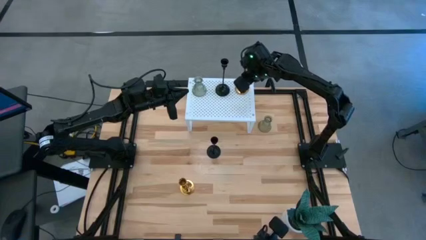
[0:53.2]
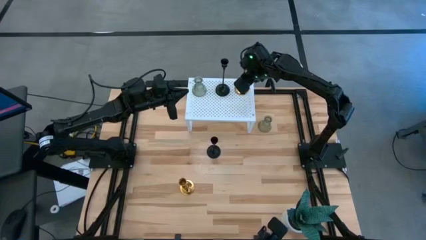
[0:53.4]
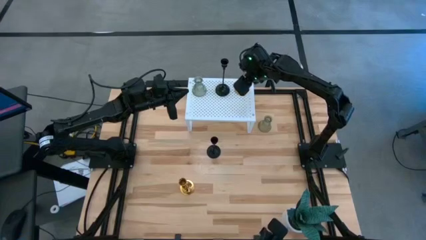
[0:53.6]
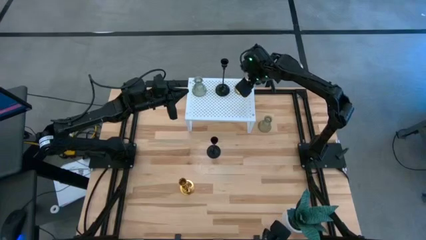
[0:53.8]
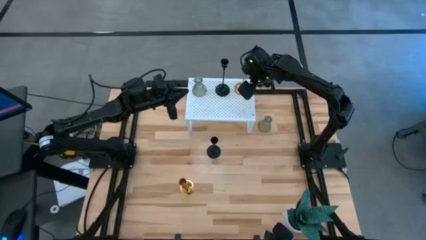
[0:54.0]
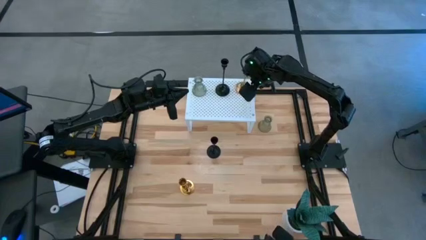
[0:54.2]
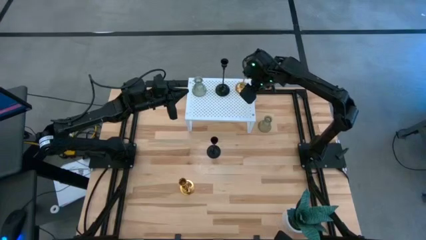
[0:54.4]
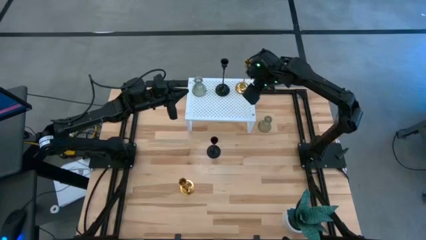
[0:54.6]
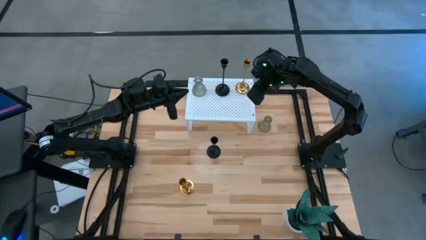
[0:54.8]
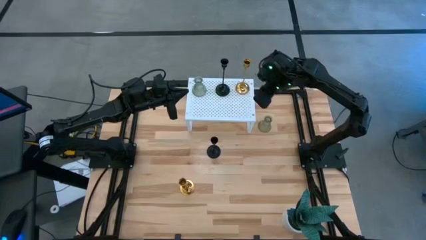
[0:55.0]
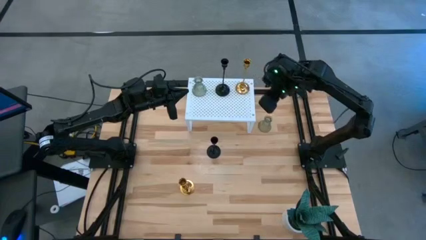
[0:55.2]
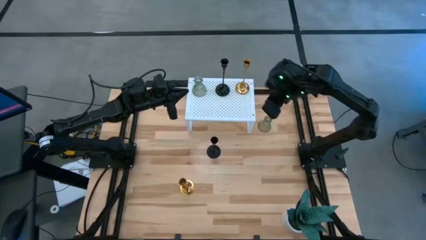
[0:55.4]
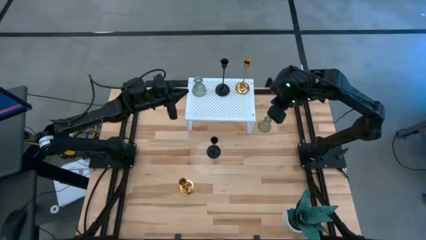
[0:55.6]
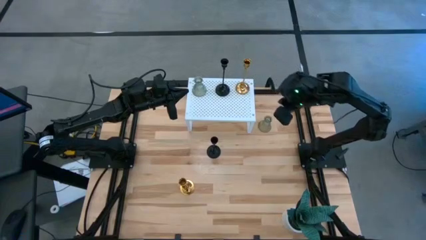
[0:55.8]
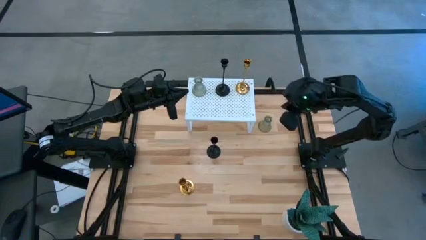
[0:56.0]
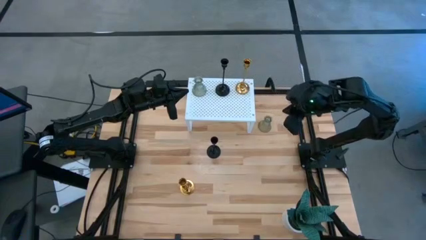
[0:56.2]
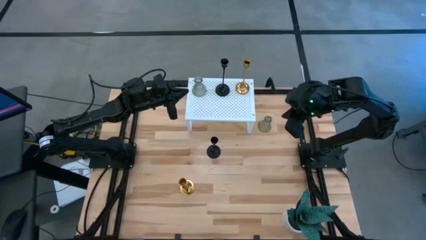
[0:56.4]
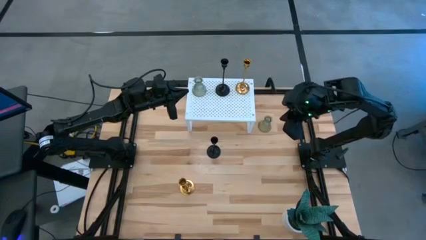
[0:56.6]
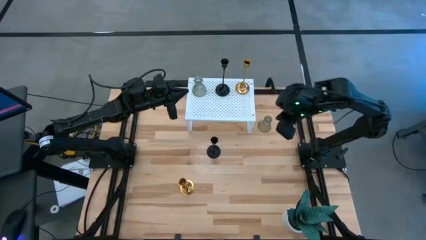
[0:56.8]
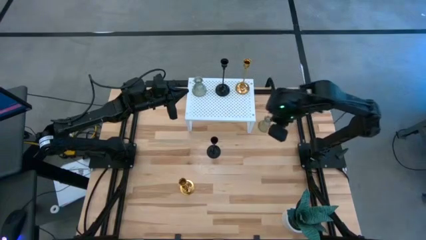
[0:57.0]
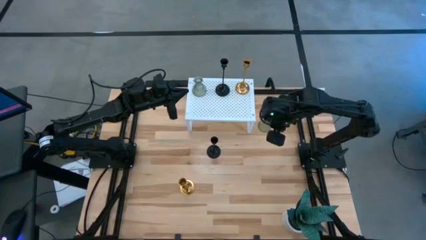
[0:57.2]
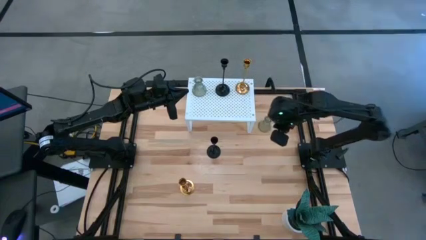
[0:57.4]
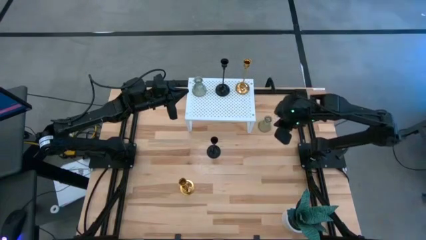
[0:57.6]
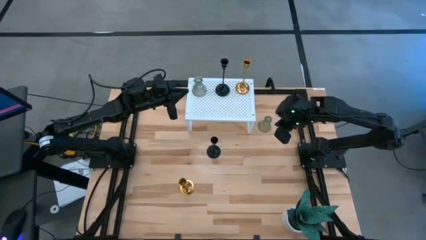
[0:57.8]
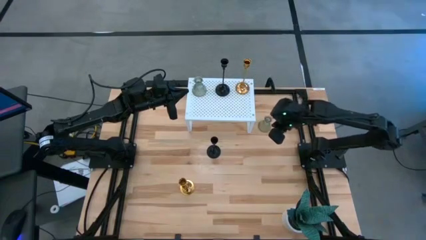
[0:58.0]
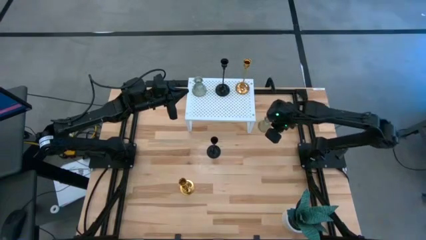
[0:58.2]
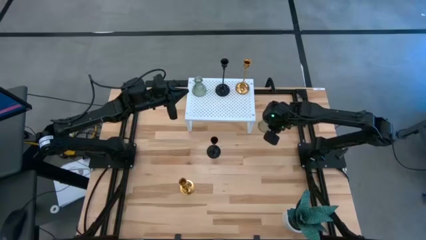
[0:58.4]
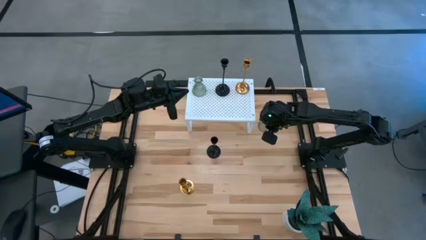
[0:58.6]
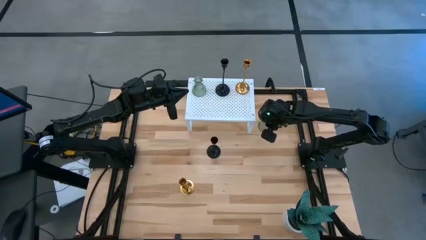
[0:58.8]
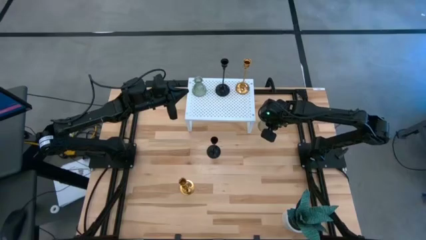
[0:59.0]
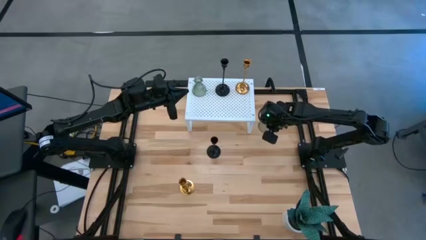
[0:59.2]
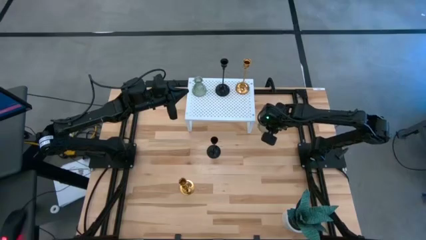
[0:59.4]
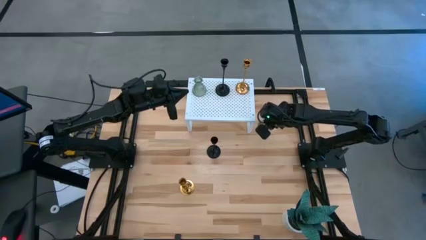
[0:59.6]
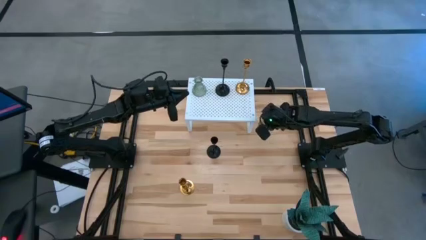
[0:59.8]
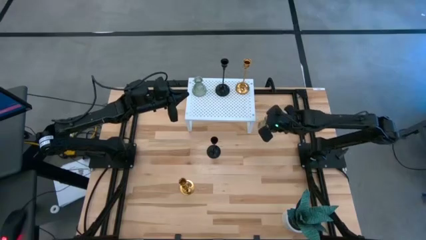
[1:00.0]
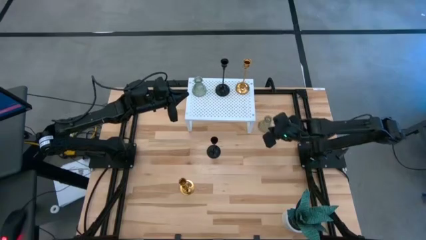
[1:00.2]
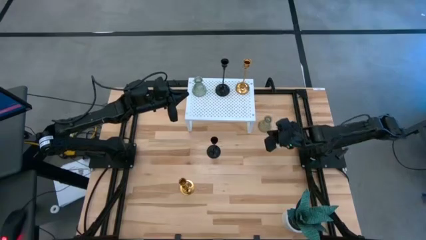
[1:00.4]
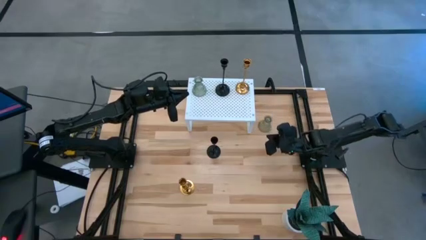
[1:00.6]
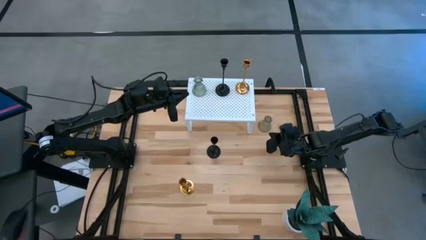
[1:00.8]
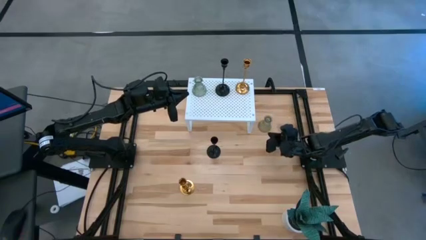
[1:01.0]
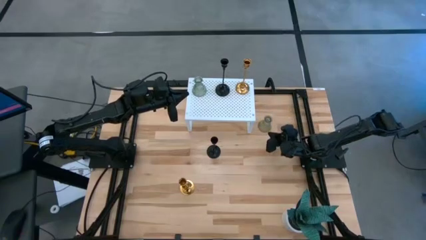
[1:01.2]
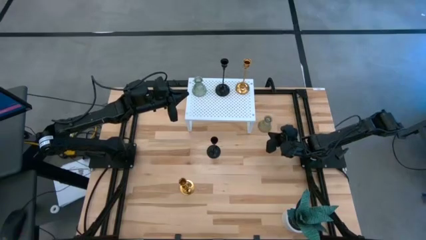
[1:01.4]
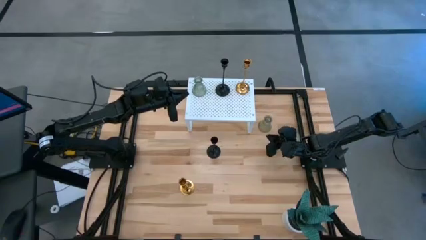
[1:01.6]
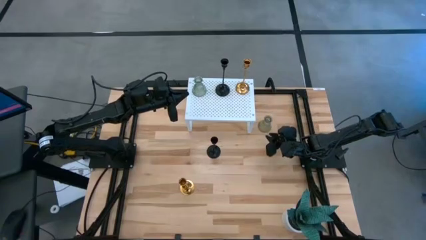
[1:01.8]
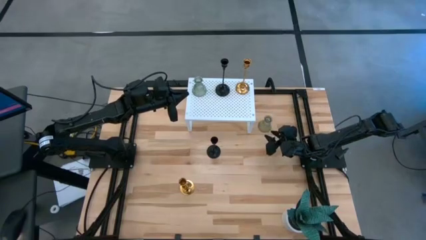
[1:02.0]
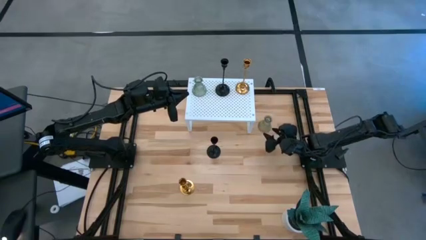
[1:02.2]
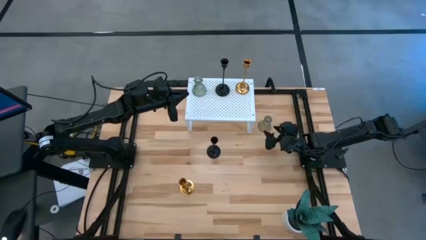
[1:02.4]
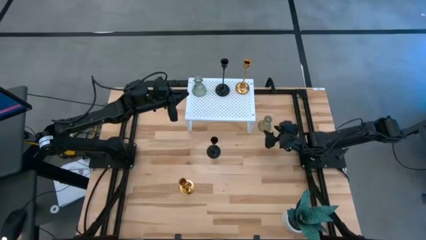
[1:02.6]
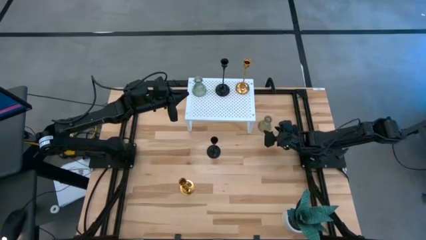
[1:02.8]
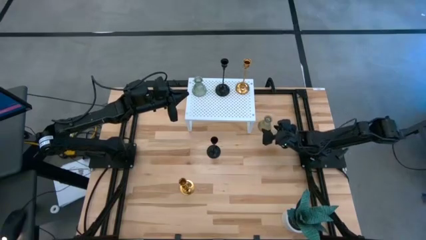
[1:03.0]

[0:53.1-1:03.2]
Task: Pick & Place candle stick holders
Align the transparent candle holder with the transparent candle holder on the shelf

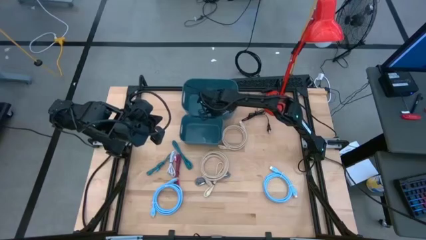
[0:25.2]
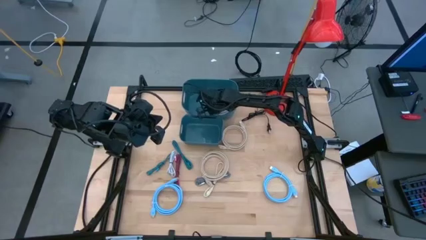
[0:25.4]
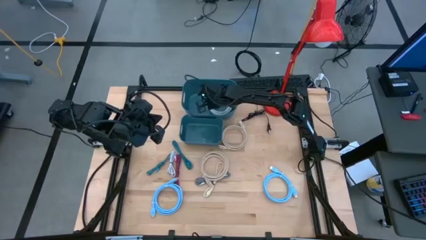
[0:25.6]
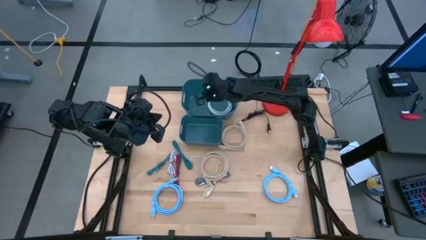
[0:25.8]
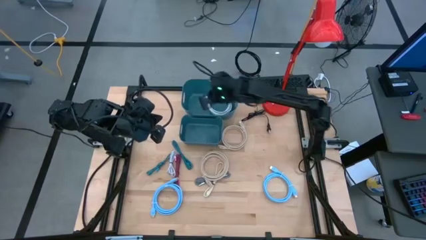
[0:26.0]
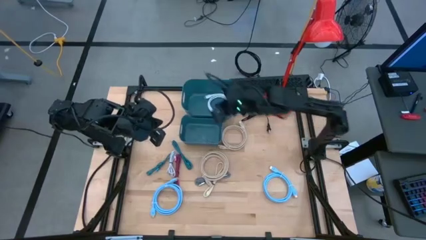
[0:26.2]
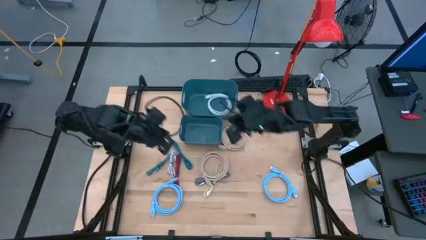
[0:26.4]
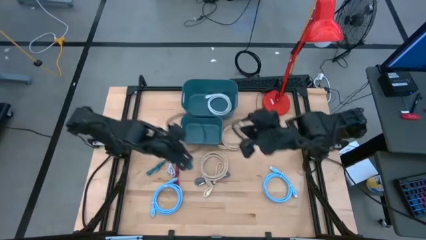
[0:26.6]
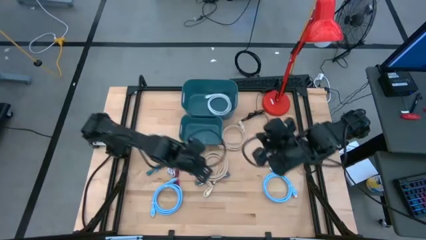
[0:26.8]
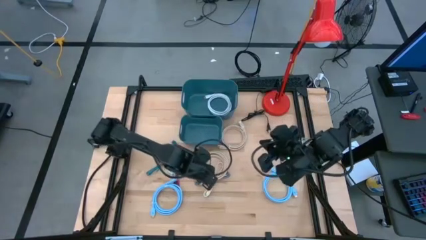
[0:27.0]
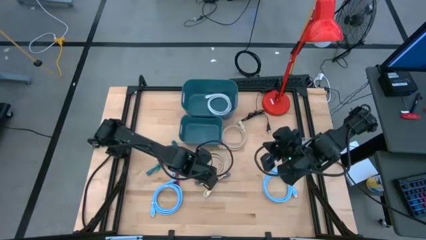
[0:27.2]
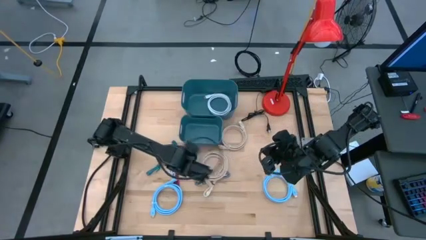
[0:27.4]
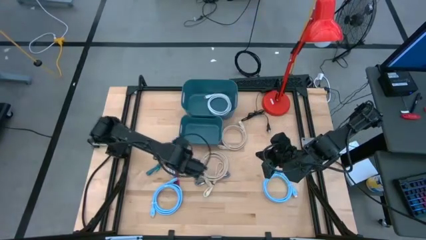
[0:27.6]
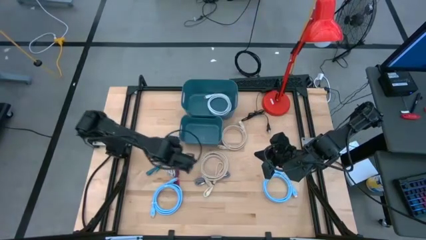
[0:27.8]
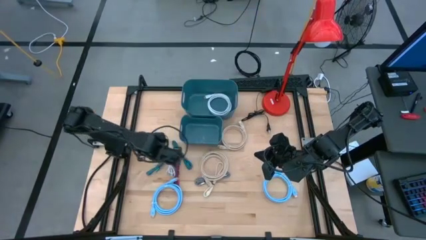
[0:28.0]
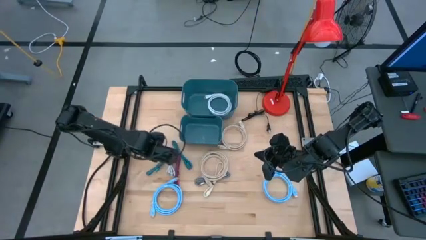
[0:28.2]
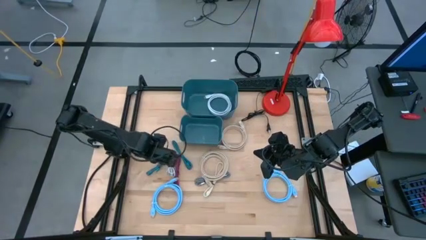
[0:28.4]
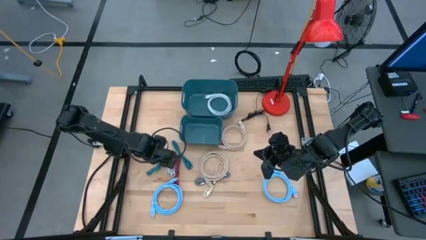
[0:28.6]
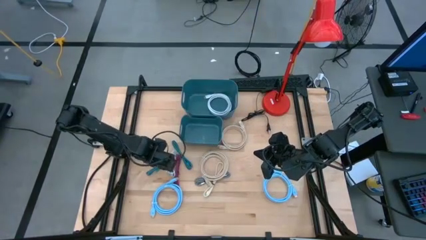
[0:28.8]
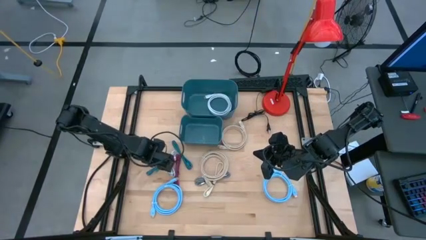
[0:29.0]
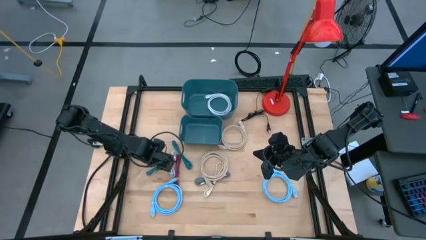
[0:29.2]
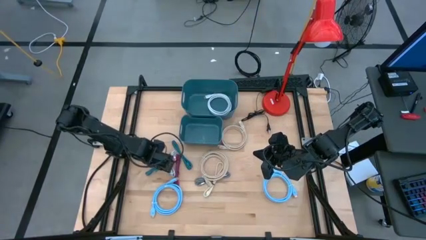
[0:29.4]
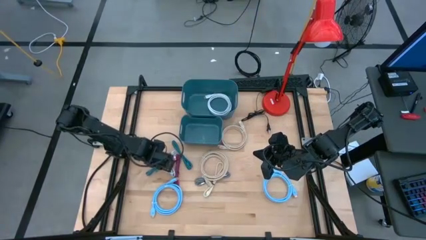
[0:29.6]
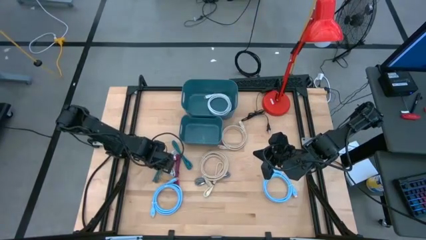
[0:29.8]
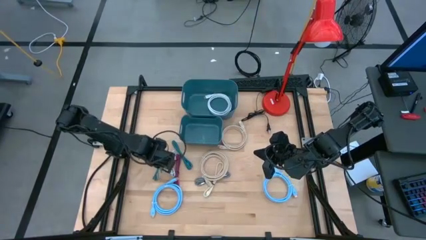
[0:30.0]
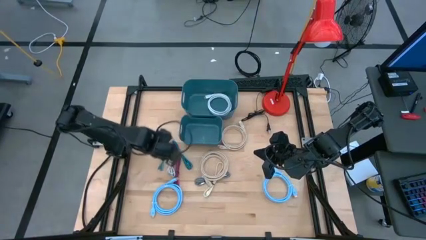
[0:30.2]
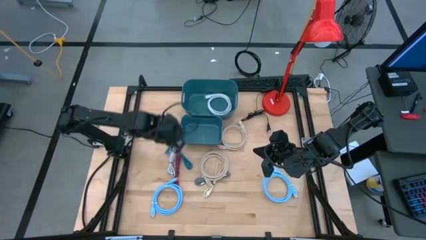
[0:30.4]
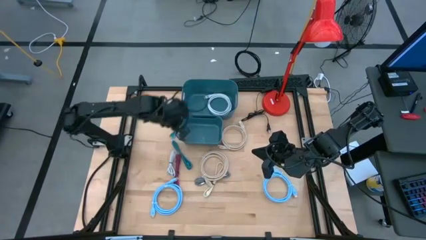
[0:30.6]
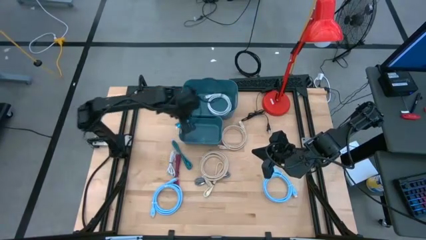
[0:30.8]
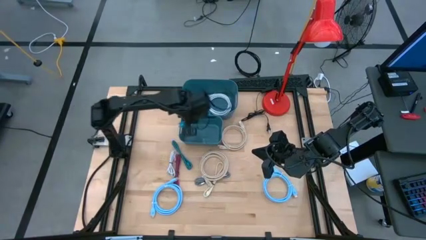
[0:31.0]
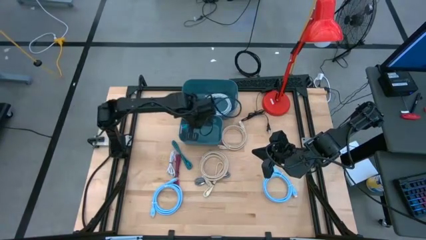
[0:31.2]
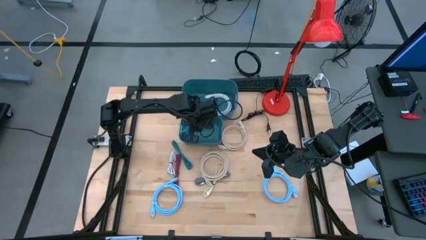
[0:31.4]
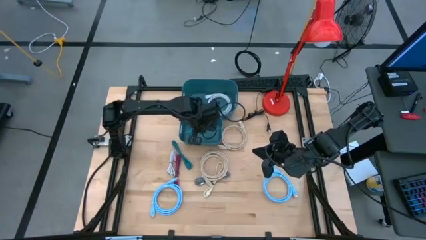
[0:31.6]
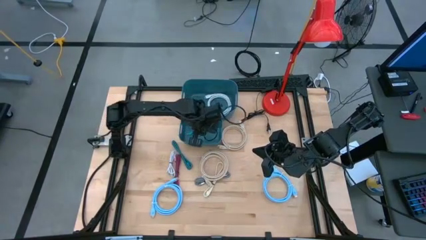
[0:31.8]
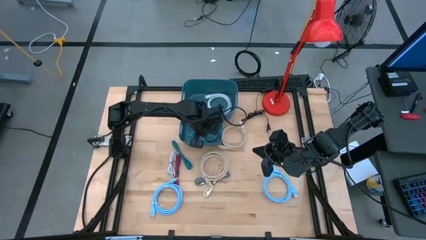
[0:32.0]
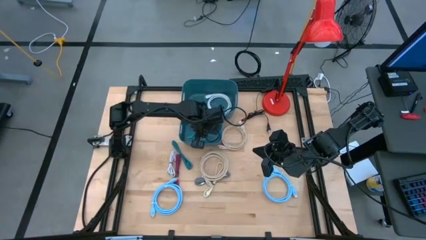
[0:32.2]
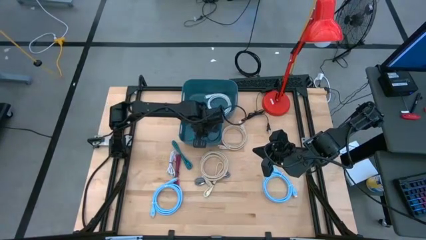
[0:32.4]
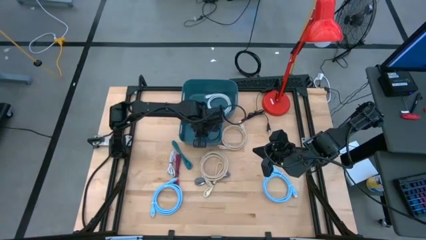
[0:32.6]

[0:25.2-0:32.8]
Task: Pick & Place USB Port
Put the left blue charger cable into the bottom blue bin
